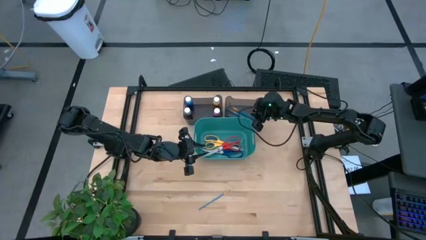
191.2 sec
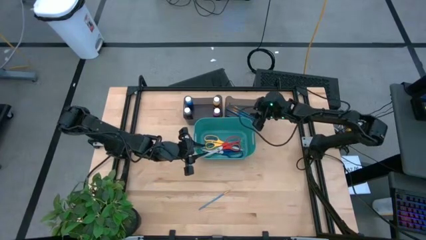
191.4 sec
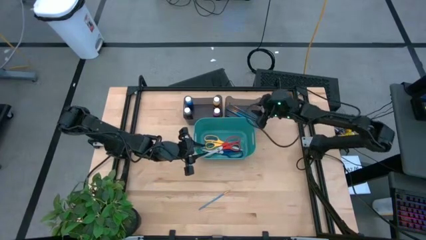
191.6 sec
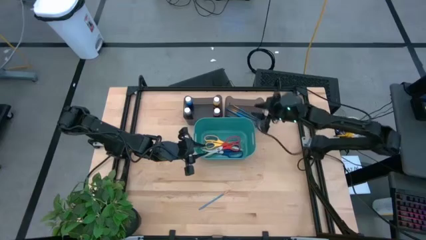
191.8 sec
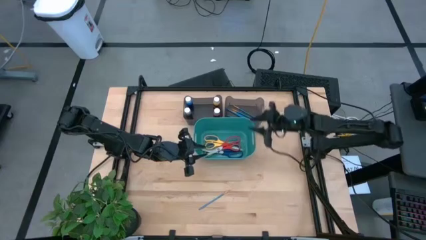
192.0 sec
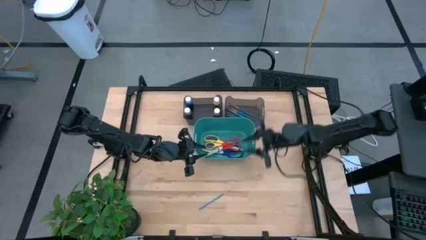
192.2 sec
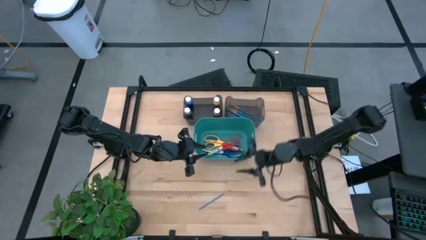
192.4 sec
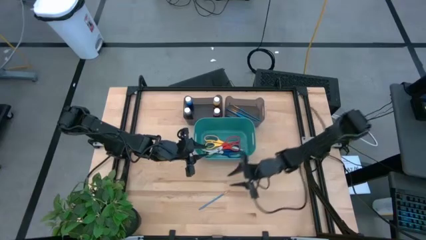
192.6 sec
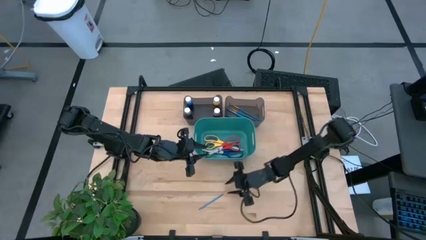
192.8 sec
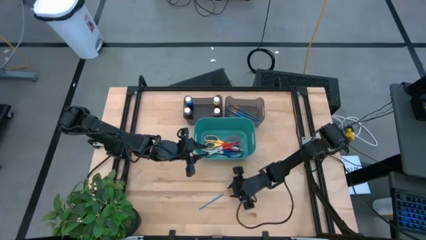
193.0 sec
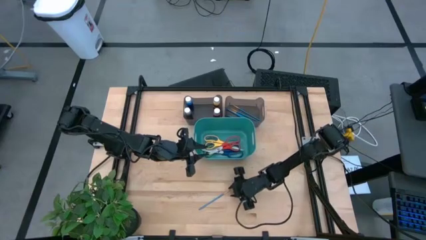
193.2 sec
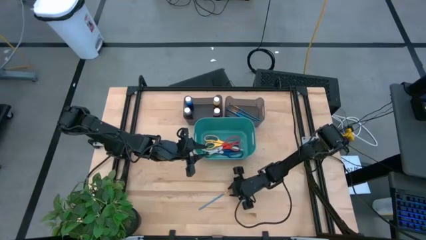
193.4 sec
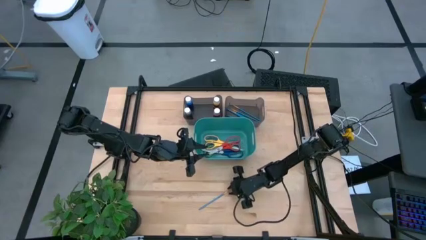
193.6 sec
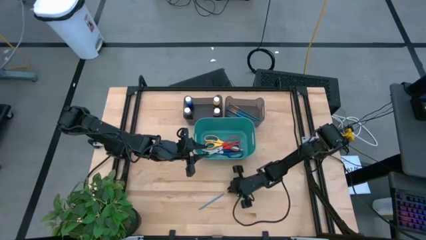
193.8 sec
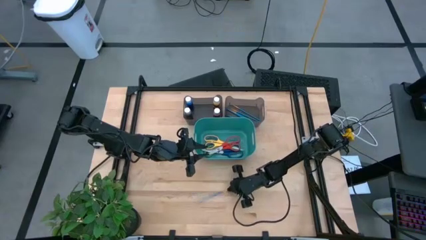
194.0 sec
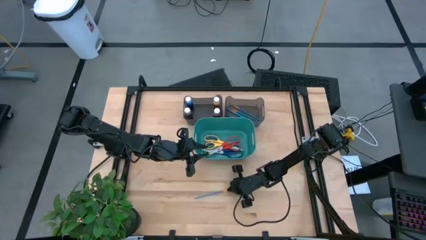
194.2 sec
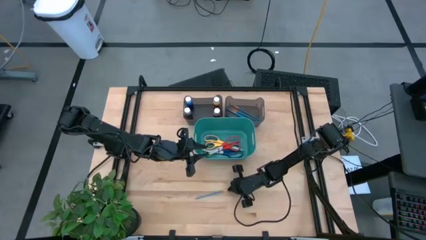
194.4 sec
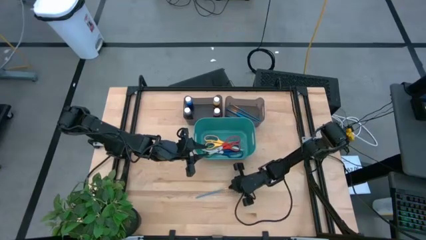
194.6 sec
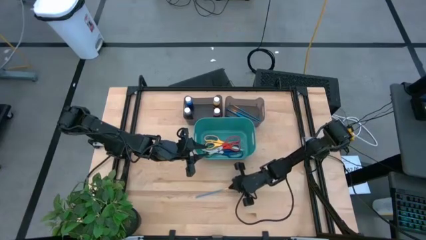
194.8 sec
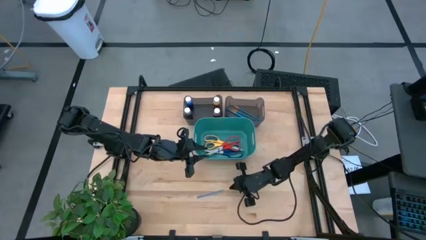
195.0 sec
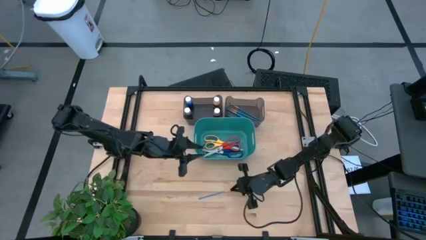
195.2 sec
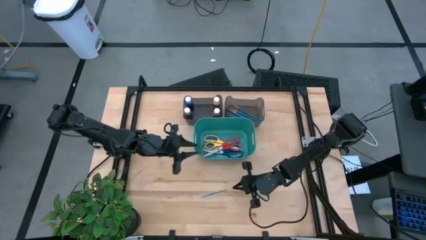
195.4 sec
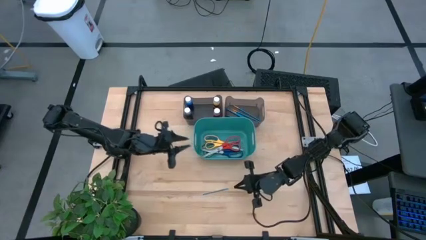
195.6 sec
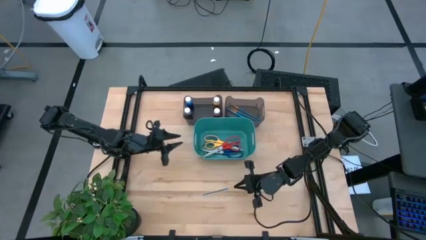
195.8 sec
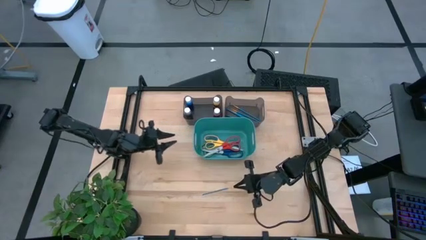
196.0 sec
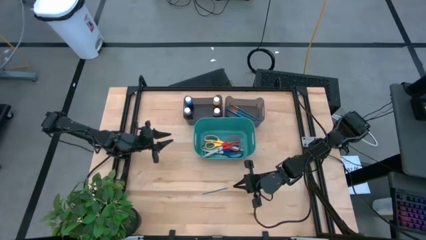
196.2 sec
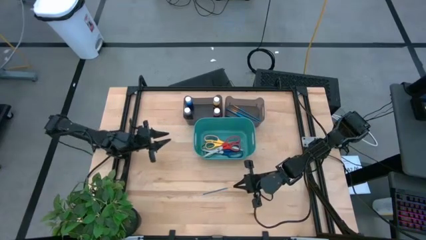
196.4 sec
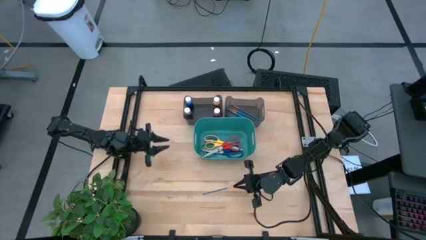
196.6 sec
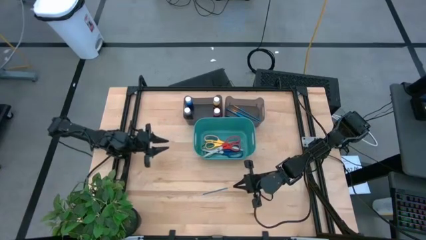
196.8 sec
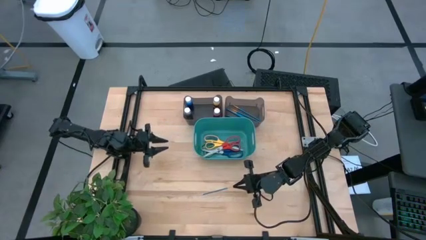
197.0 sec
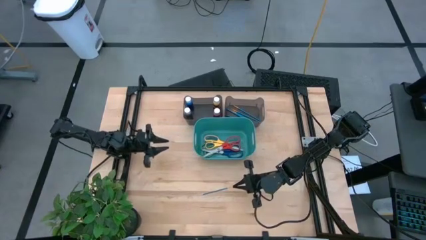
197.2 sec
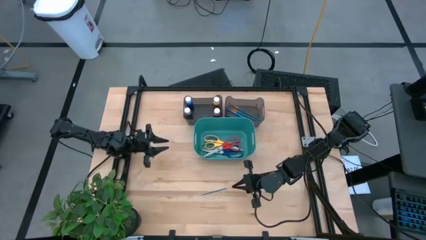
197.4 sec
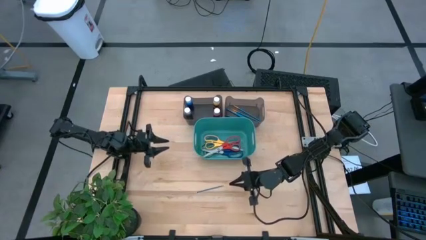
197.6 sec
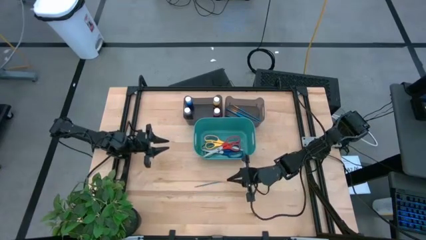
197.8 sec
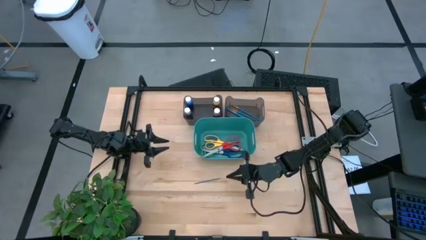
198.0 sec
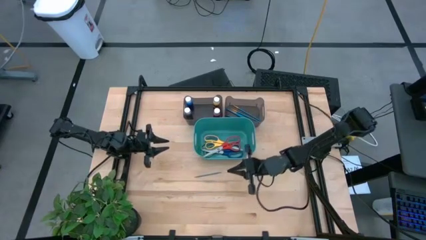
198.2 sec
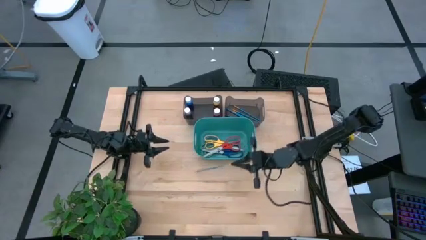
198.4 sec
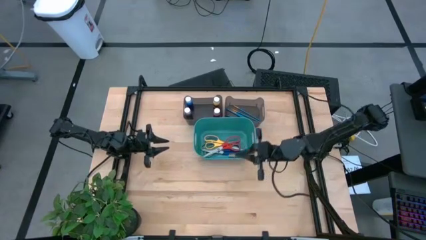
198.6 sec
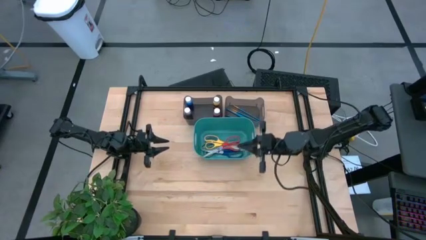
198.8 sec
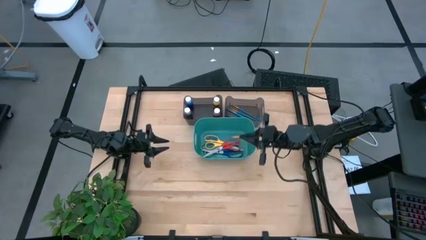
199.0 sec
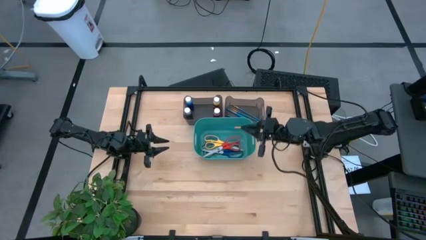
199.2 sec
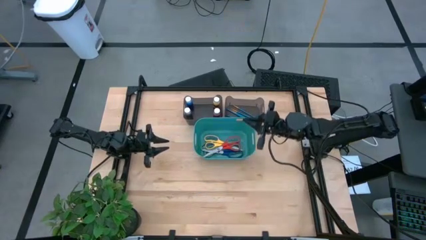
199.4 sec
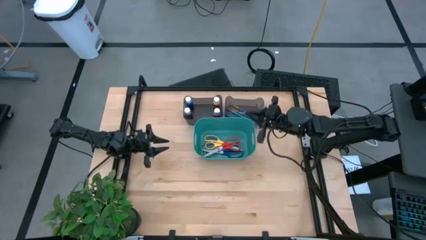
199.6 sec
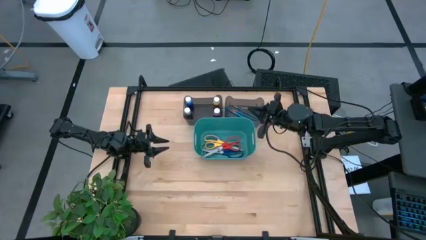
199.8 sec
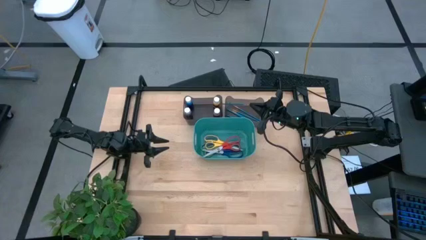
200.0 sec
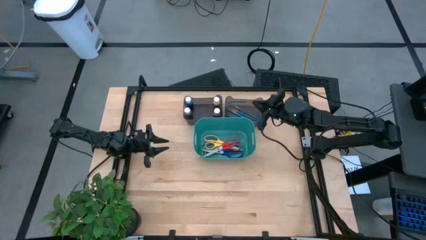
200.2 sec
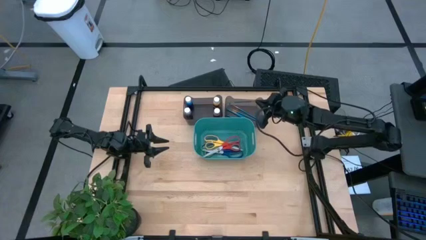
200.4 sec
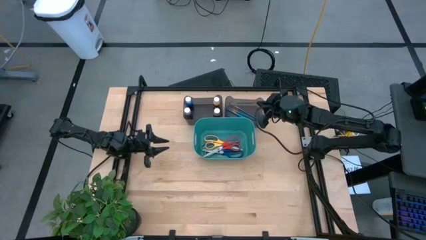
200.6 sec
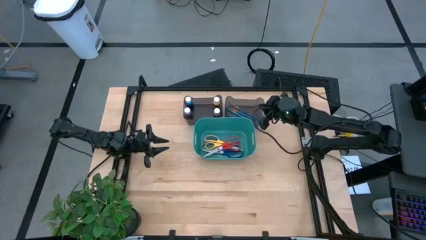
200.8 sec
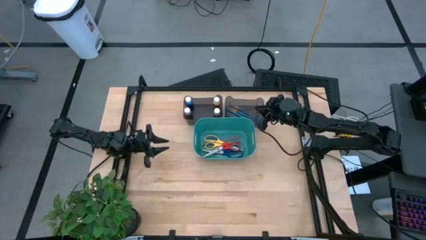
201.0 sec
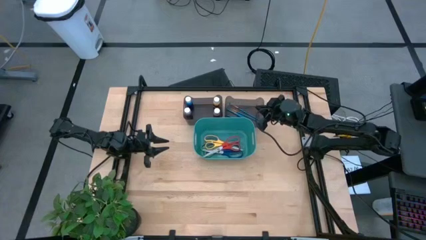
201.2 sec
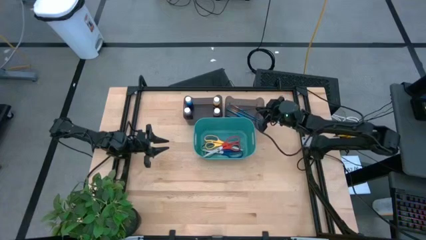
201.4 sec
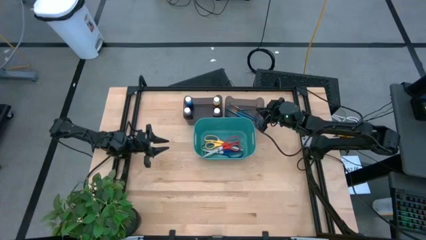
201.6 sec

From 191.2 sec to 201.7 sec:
Task: Pick & Place Paint Supplies
Put the blue paint brush into the right black bin

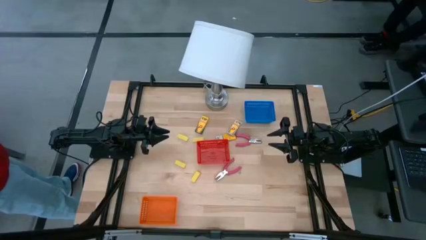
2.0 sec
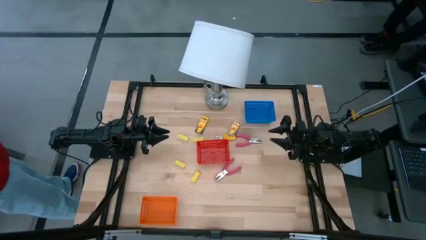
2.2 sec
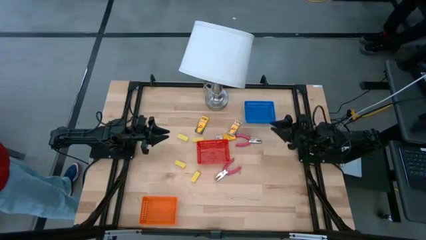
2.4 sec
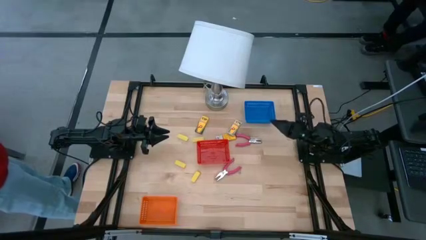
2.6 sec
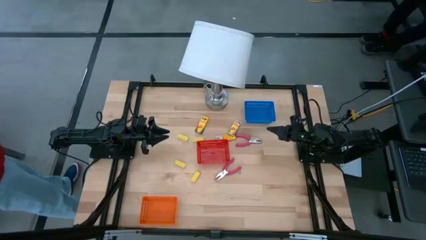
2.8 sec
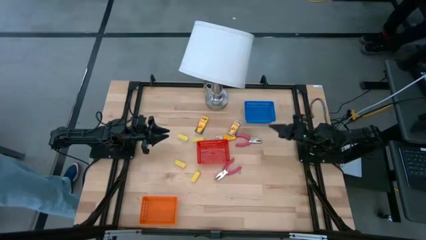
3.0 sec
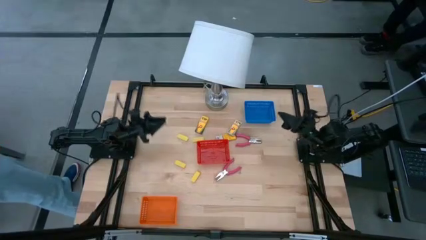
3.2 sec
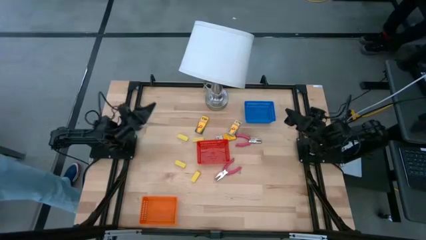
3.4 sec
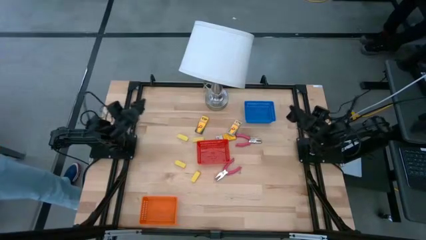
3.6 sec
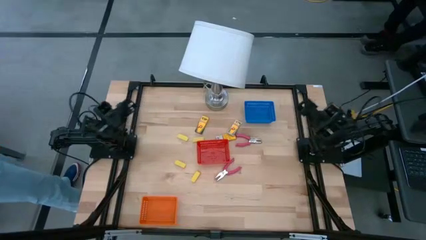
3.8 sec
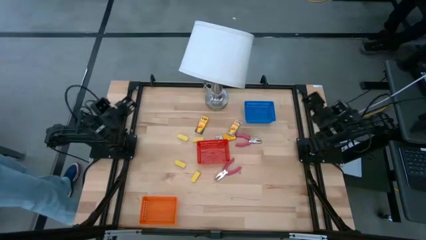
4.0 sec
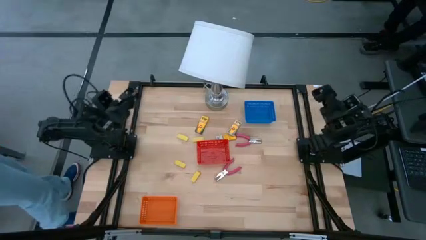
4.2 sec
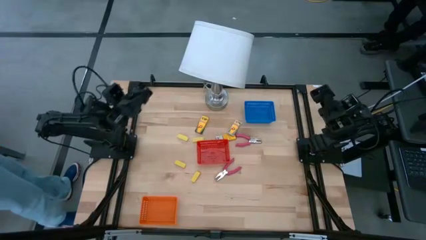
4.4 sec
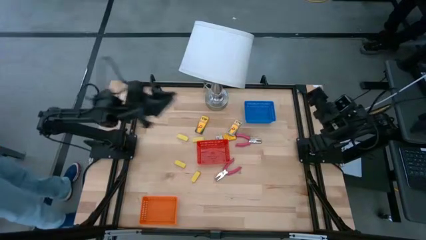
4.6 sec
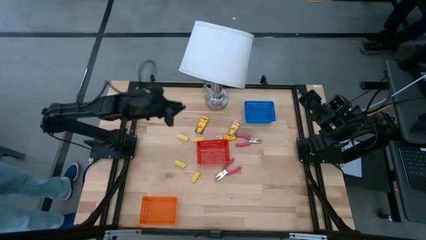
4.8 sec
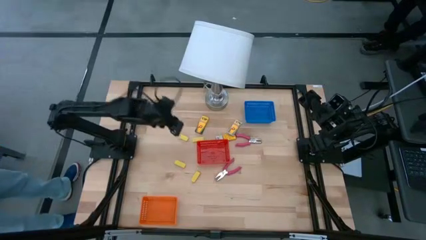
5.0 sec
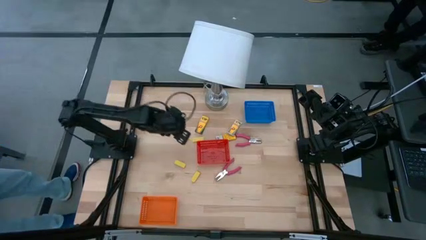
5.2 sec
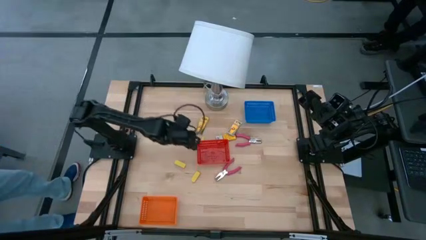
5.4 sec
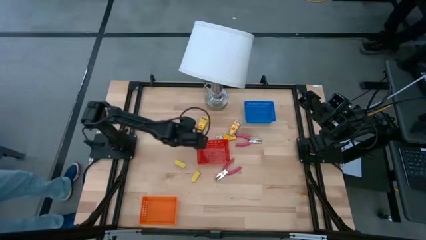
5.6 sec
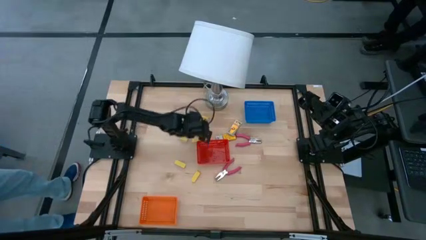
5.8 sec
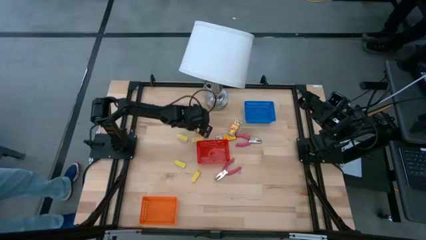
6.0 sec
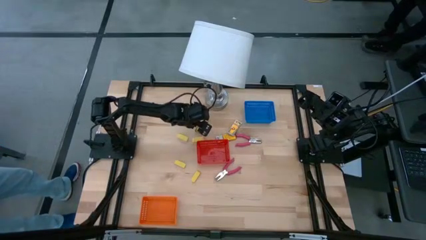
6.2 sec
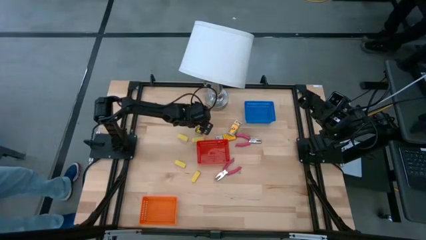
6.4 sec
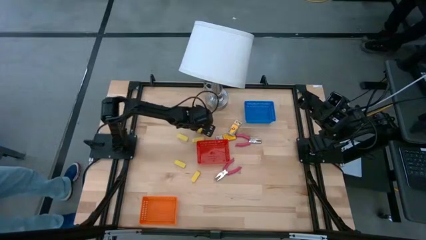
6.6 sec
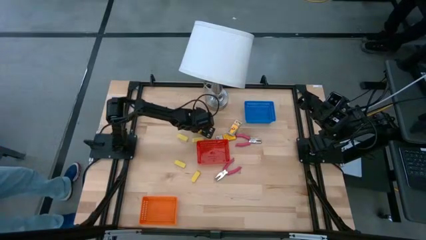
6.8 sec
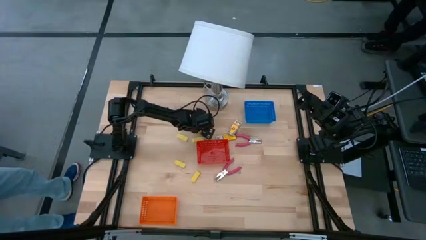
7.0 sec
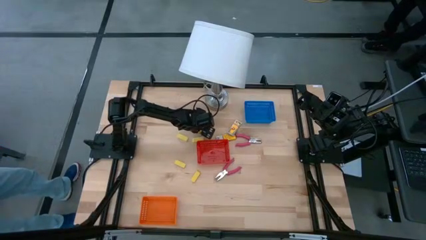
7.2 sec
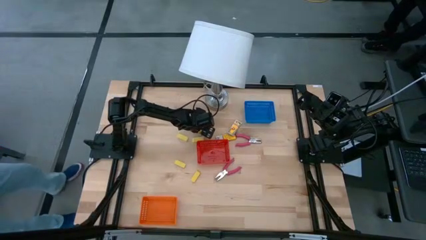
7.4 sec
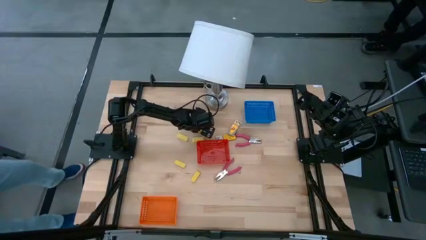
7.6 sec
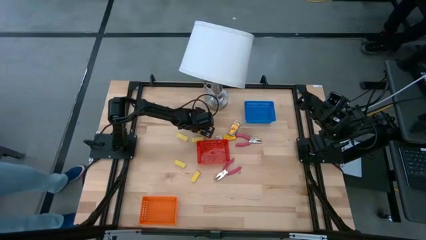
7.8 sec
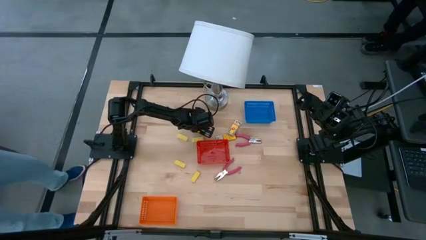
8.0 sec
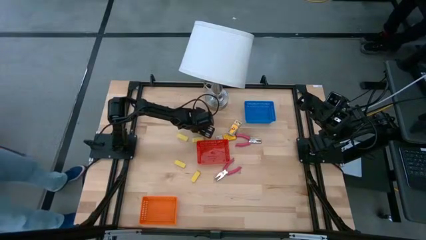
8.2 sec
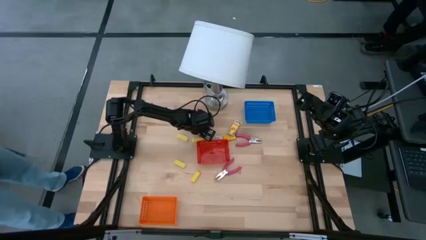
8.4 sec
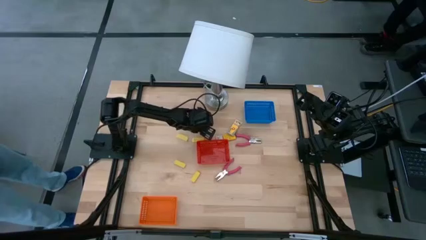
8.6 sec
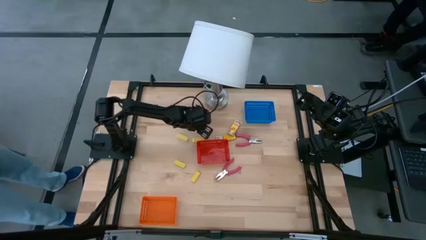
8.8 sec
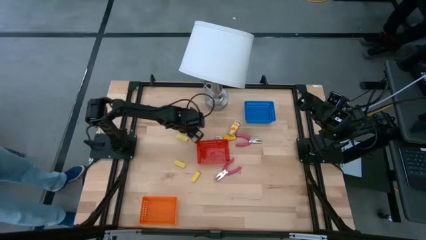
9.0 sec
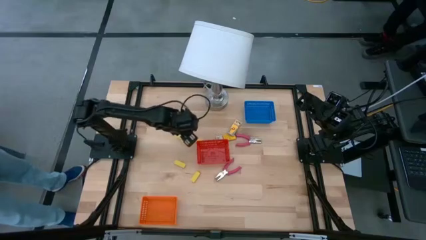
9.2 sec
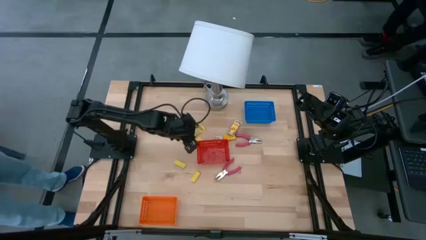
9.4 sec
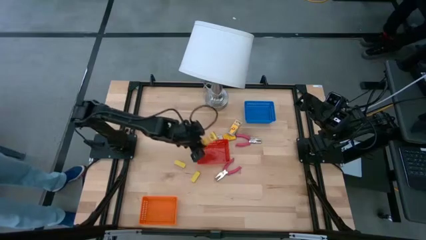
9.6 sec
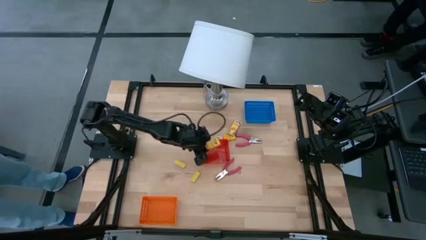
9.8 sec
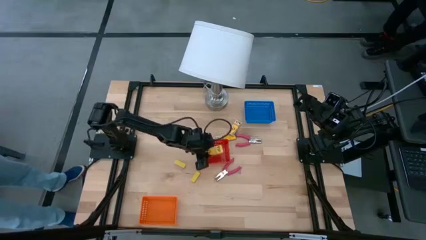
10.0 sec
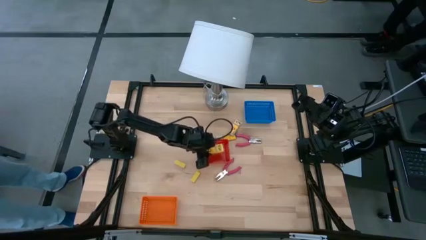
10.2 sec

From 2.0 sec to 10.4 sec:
Task: Pick & Place School Supplies
Put the yellow crayon box into the red bin
